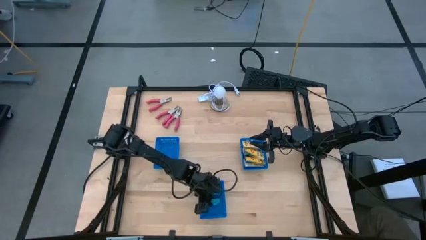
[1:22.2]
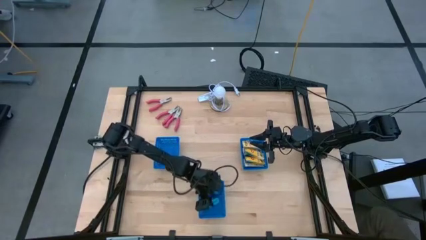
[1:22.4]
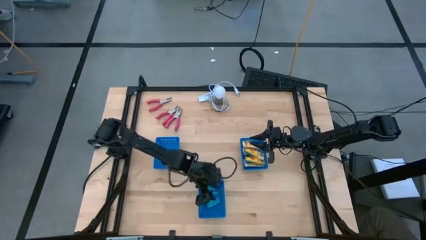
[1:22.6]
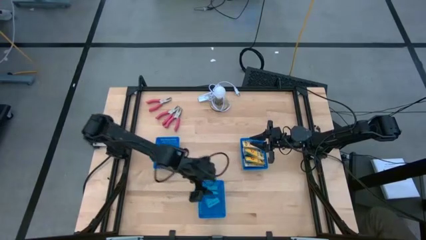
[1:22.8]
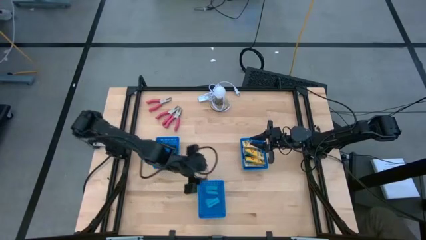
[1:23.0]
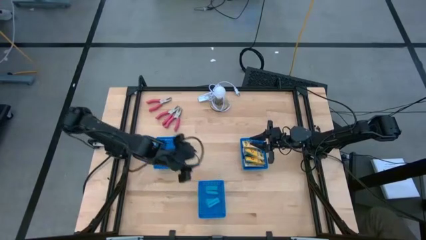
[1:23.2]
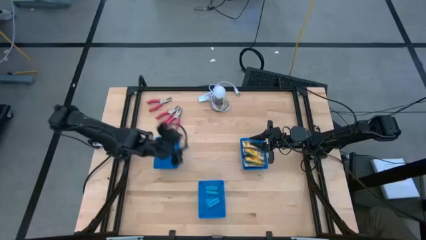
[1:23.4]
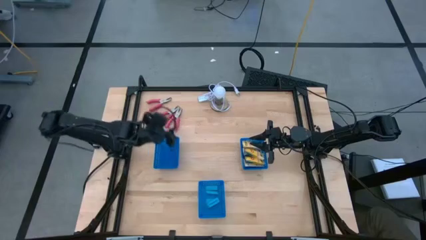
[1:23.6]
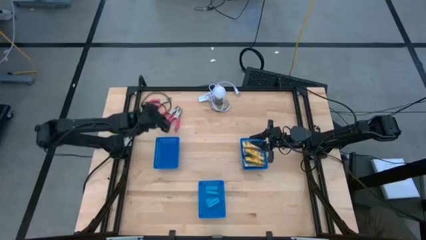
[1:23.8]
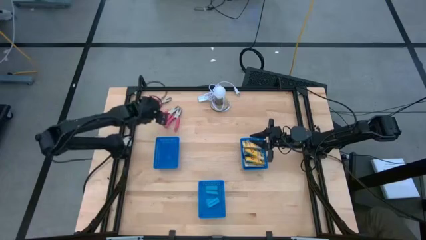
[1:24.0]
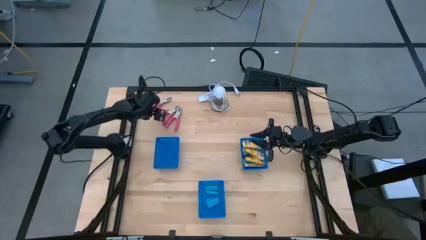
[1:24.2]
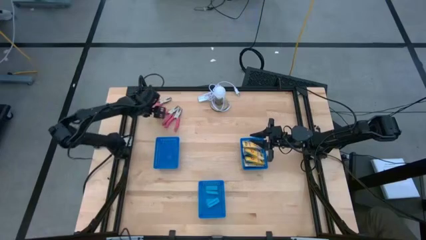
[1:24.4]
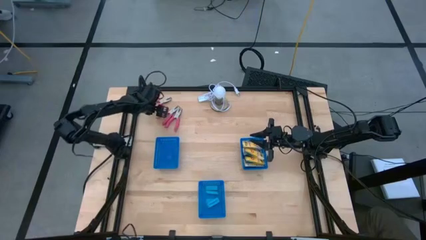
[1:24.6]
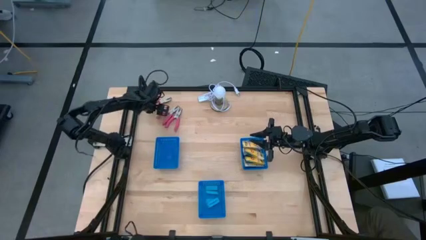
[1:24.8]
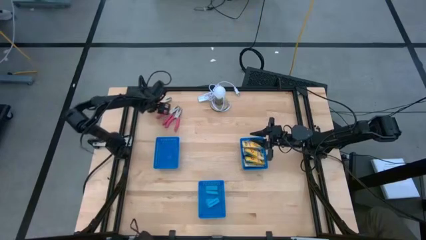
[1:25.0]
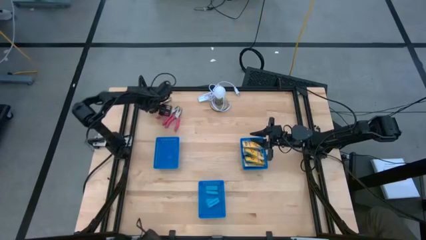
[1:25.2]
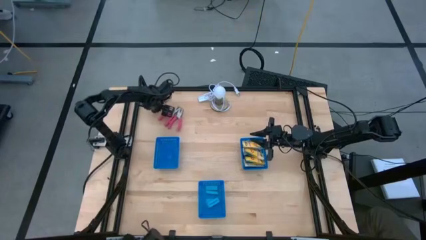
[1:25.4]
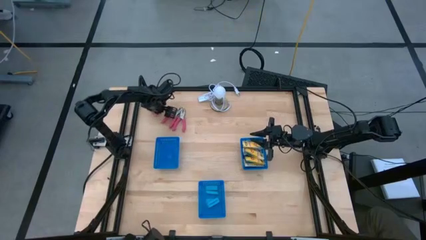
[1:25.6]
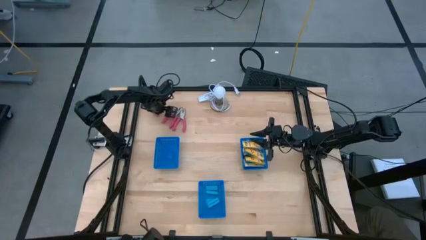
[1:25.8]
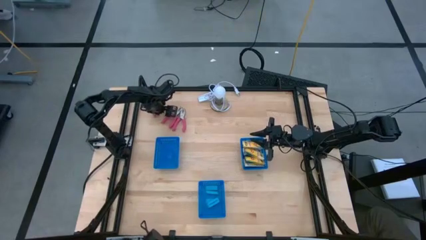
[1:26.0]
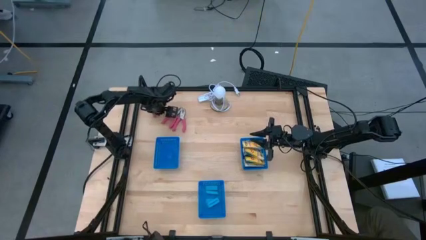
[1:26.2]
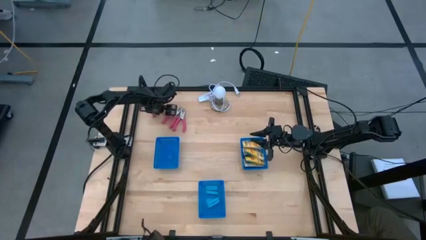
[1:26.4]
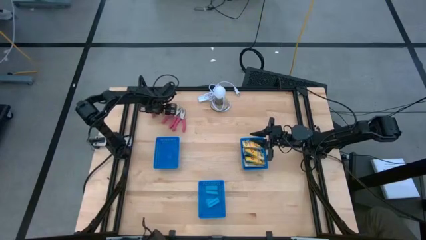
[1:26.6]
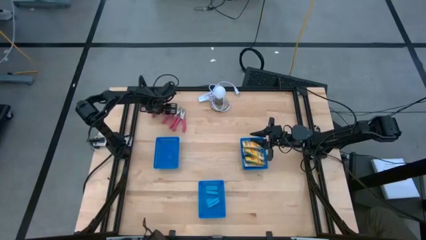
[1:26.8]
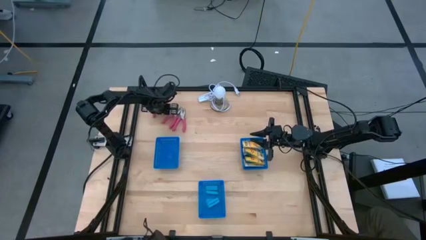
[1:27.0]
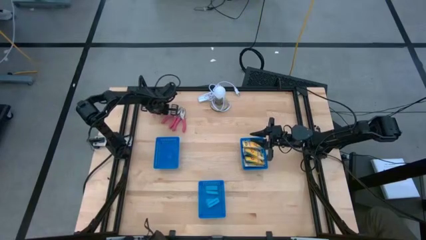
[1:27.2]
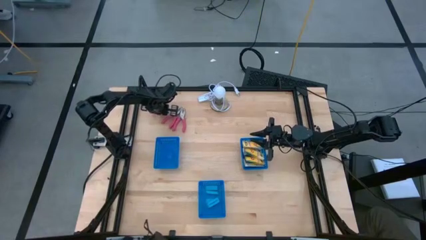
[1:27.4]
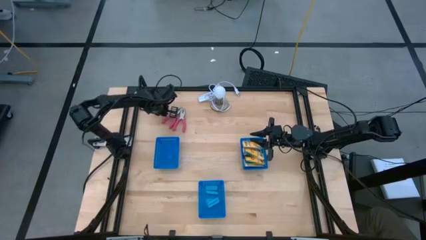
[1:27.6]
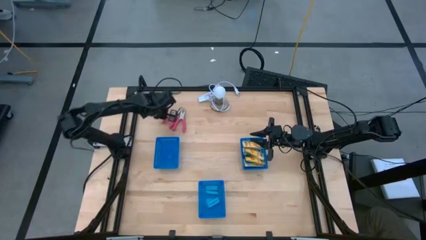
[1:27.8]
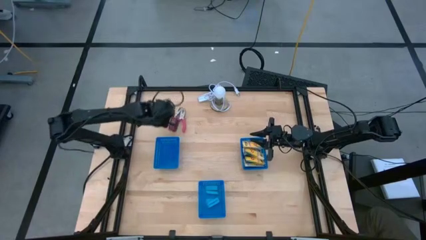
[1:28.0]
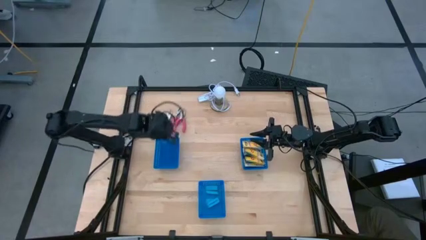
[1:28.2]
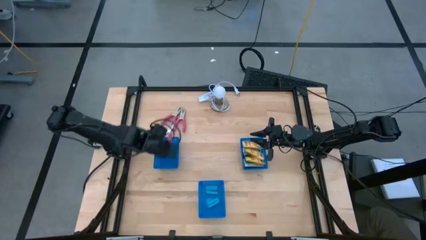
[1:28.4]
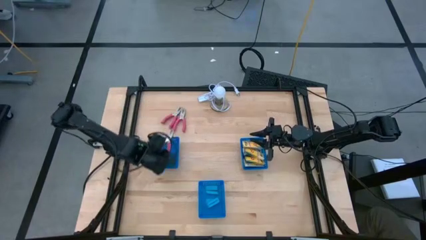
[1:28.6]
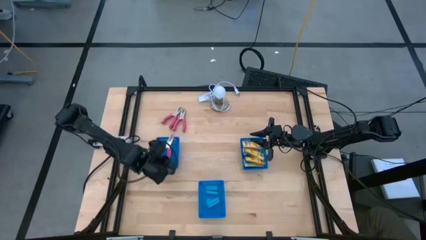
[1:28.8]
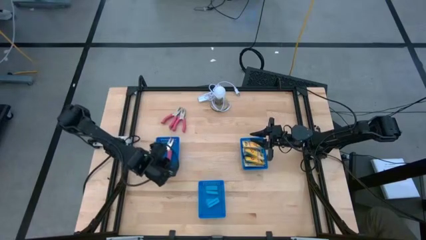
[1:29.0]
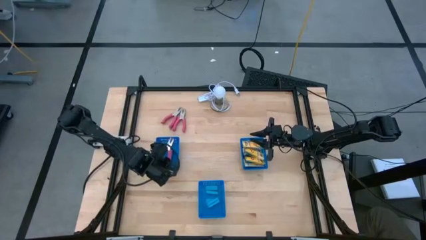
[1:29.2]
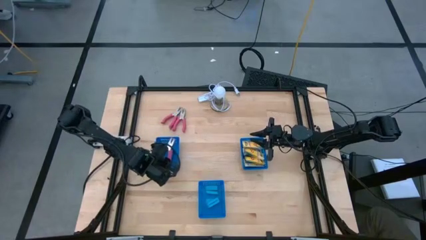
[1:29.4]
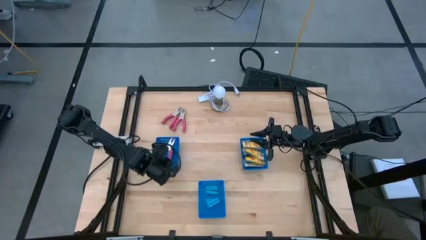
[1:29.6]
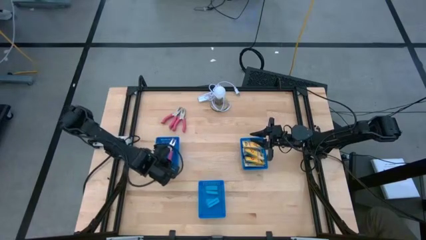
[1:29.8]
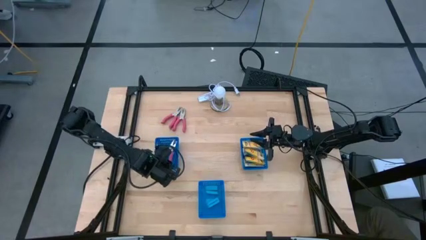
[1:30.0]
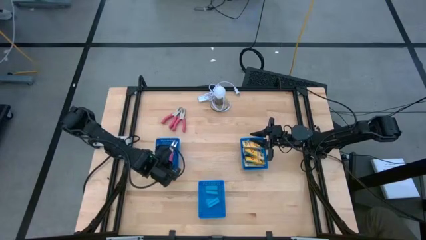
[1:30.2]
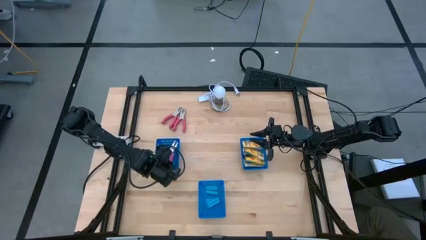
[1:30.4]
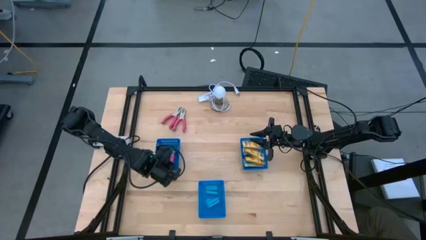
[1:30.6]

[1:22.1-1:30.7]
Task: Pick & Place School Supplies
Put the pink hole puncher into the top left blue bin

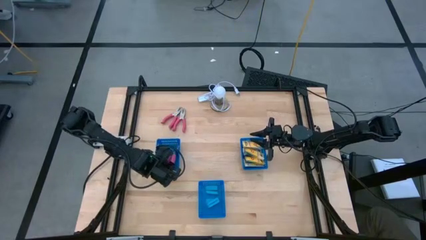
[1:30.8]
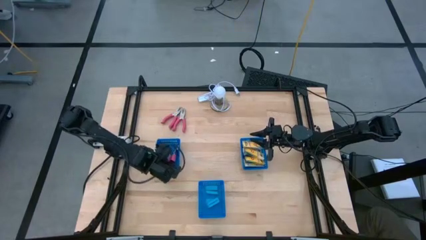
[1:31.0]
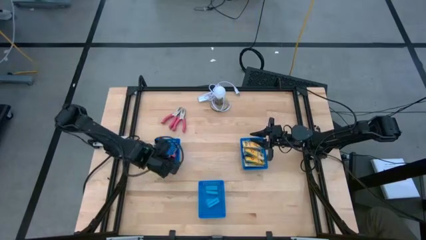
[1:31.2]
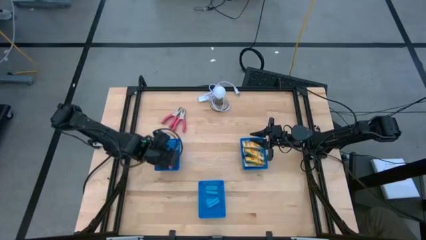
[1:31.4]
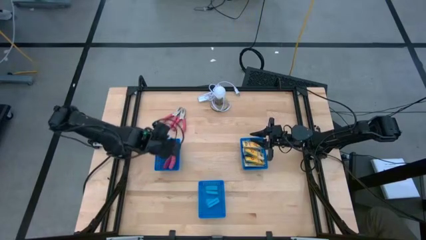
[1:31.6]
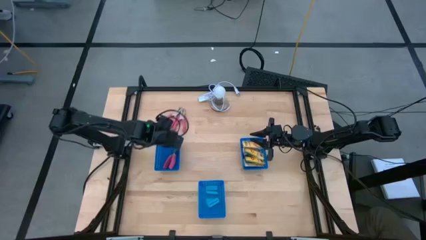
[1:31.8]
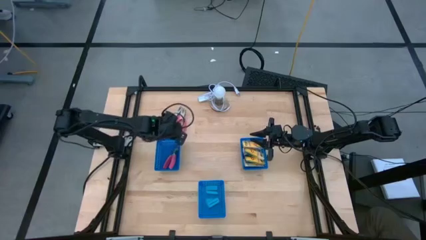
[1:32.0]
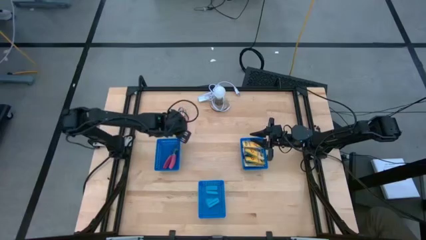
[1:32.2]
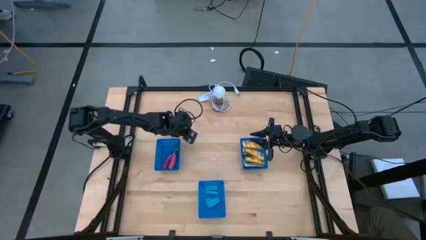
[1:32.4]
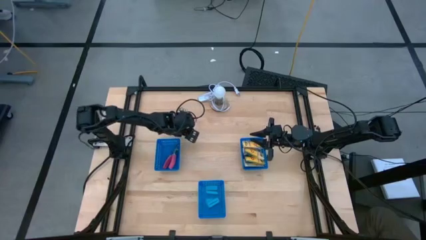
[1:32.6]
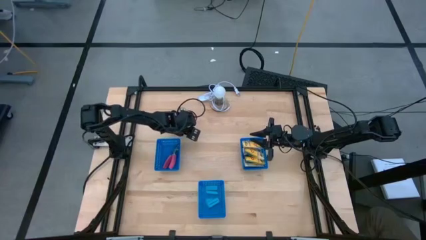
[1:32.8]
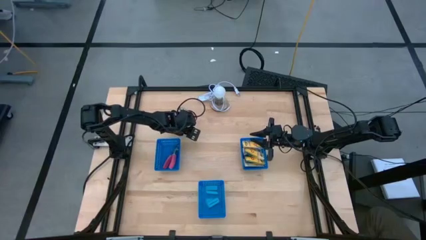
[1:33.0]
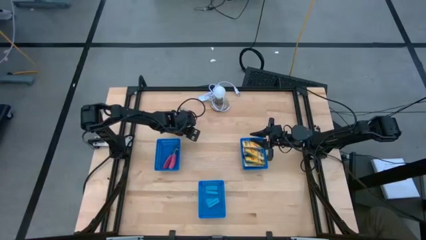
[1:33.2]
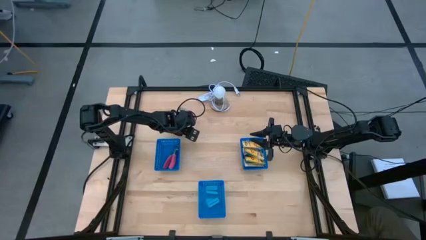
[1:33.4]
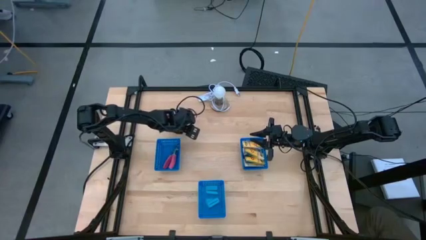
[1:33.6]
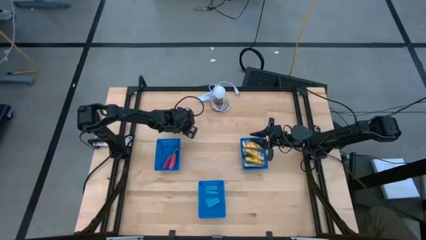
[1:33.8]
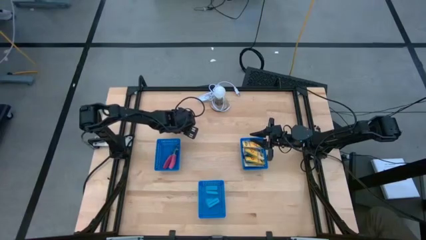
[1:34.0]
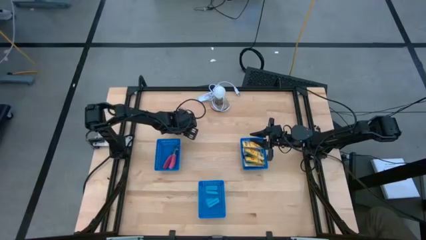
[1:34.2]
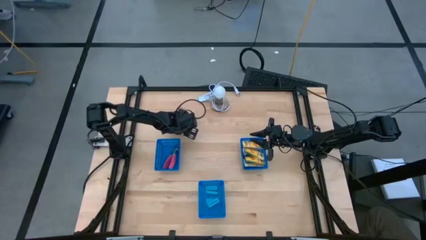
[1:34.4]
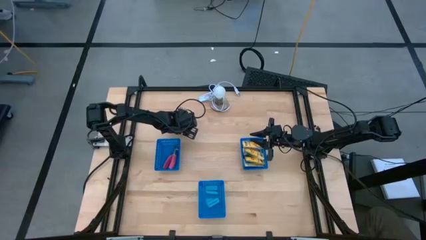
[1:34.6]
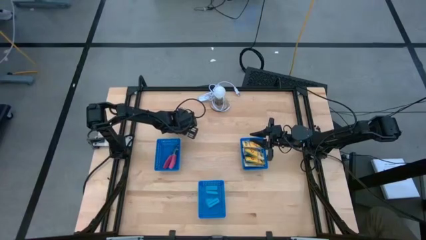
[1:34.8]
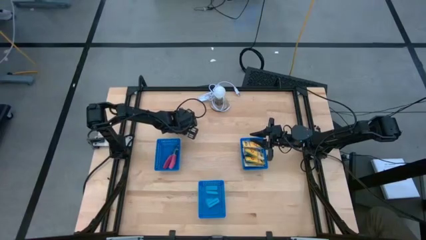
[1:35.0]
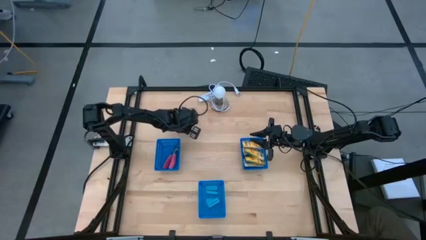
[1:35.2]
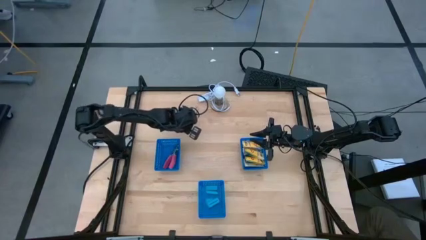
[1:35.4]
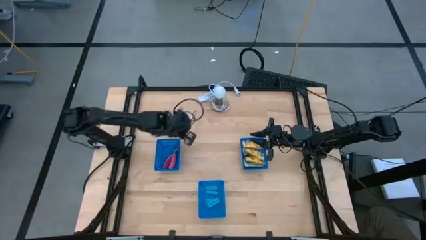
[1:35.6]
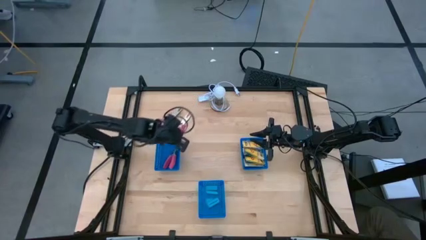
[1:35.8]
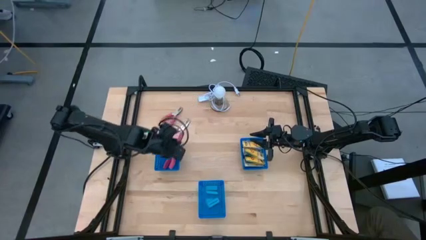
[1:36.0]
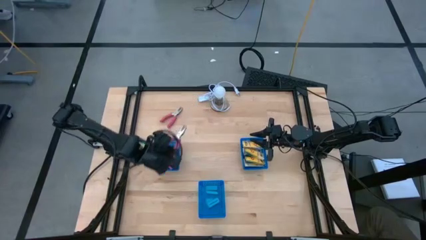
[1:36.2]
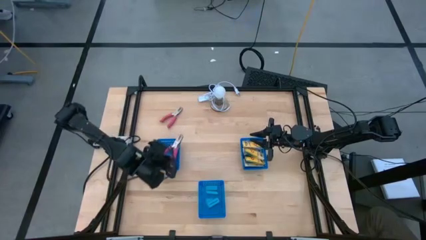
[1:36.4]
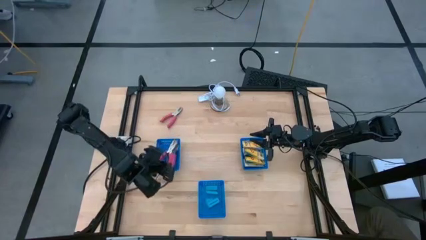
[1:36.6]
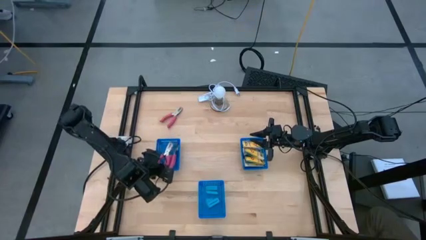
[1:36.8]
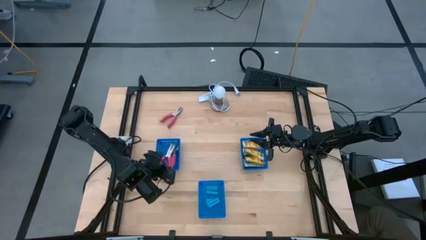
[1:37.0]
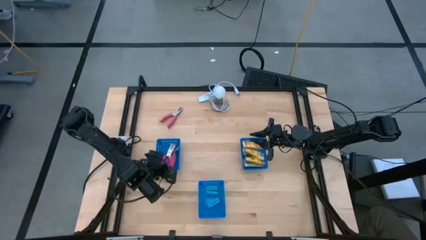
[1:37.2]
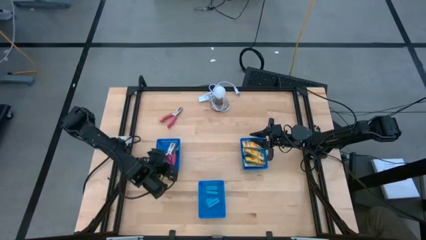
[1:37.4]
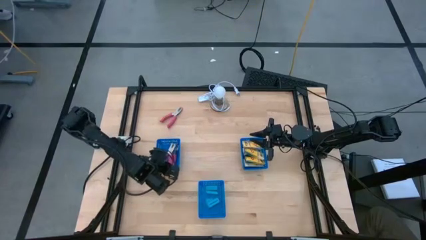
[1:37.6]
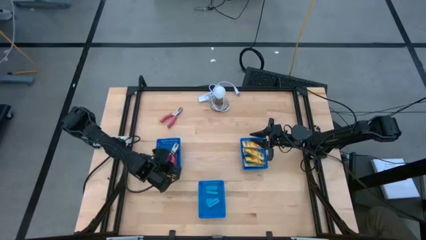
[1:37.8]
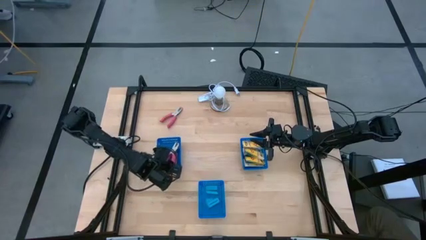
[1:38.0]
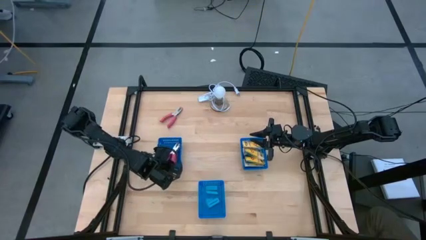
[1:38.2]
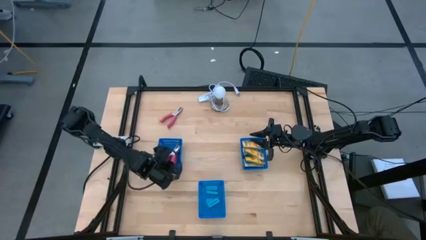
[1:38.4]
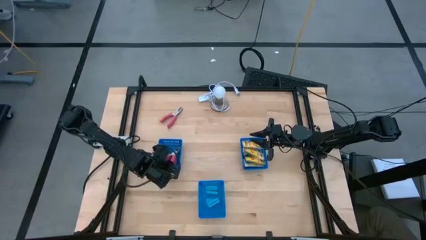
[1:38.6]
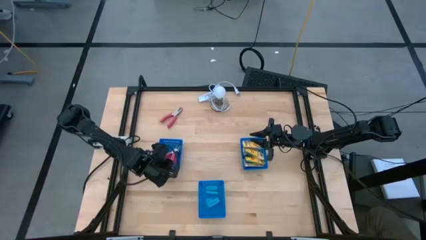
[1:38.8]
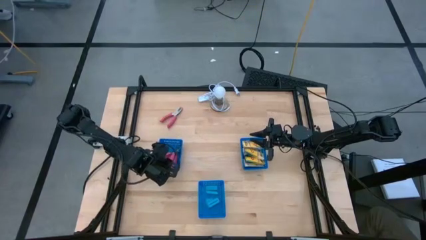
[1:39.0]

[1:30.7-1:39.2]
Put the pink hole puncher into the top left blue bin
